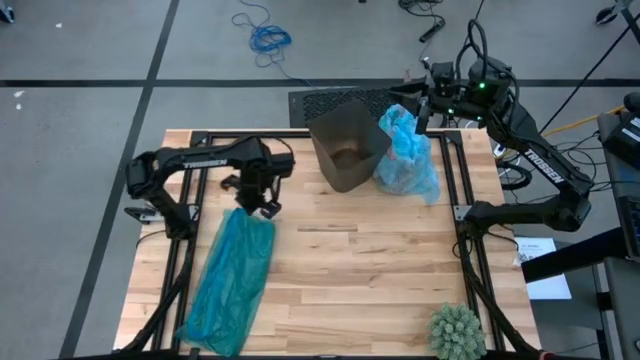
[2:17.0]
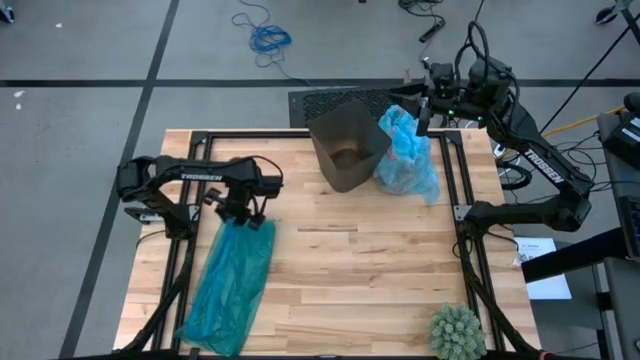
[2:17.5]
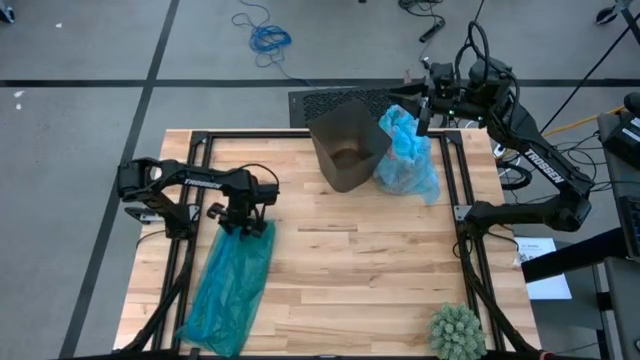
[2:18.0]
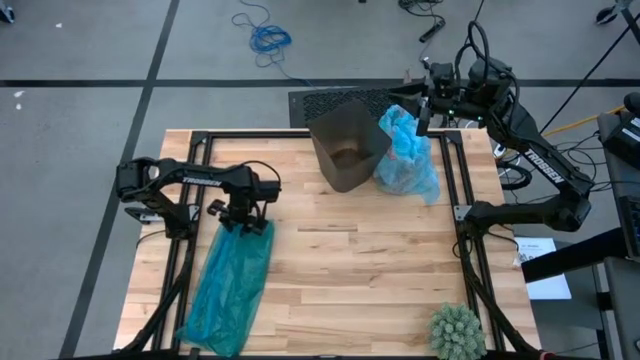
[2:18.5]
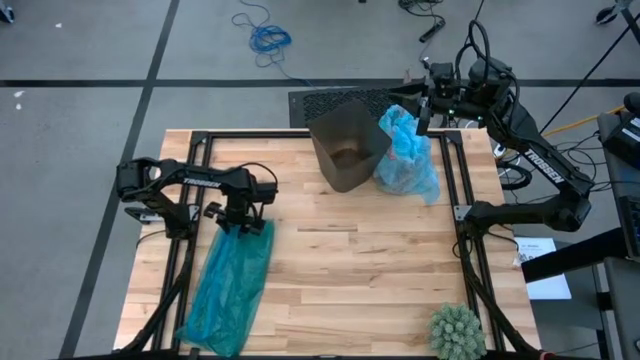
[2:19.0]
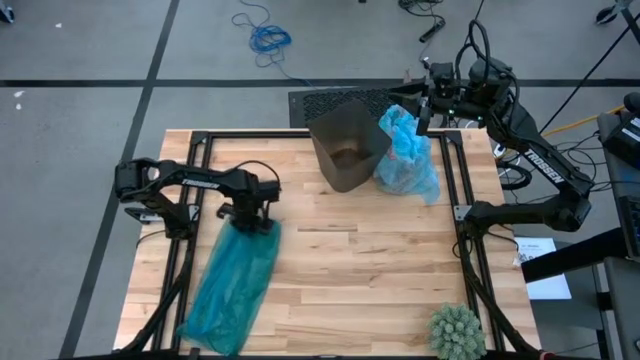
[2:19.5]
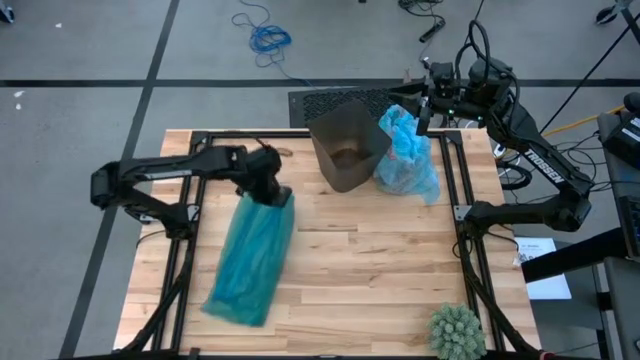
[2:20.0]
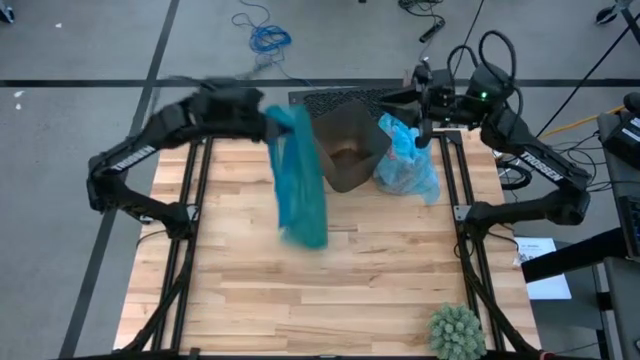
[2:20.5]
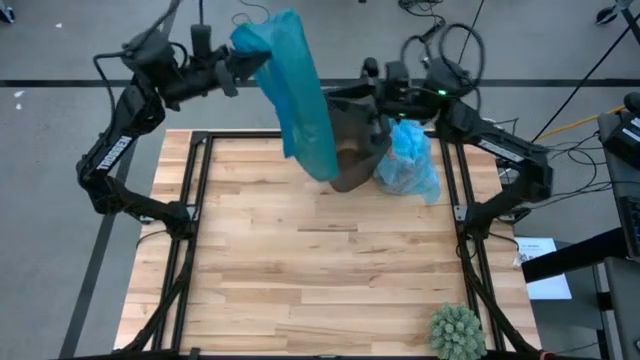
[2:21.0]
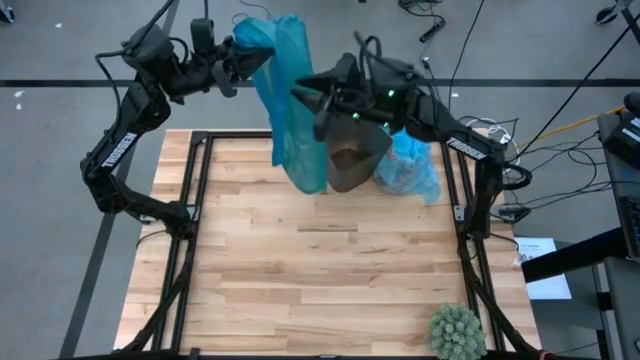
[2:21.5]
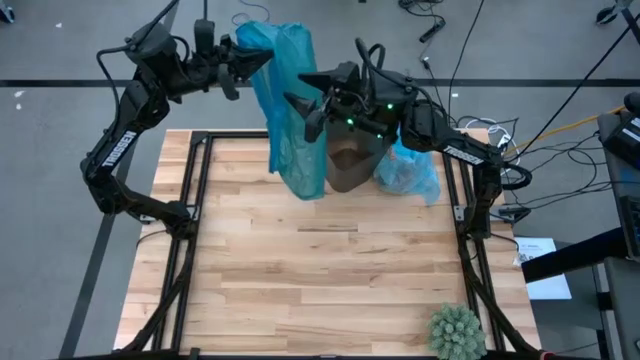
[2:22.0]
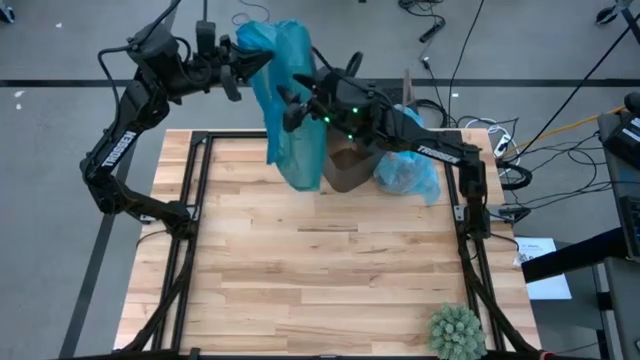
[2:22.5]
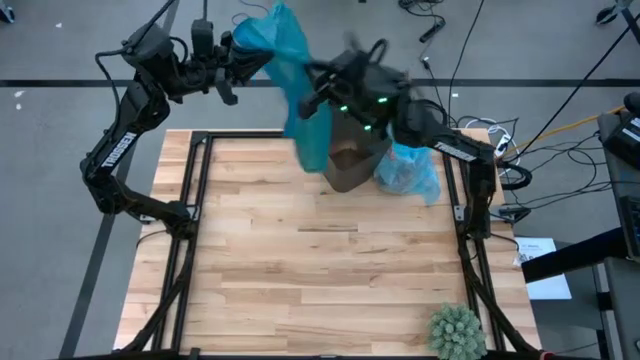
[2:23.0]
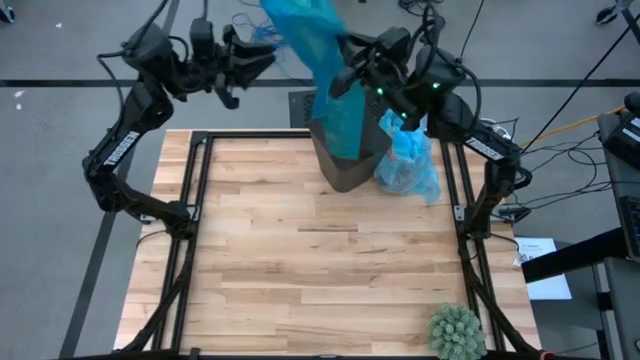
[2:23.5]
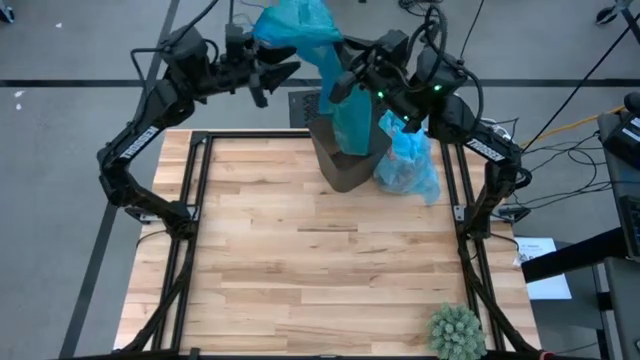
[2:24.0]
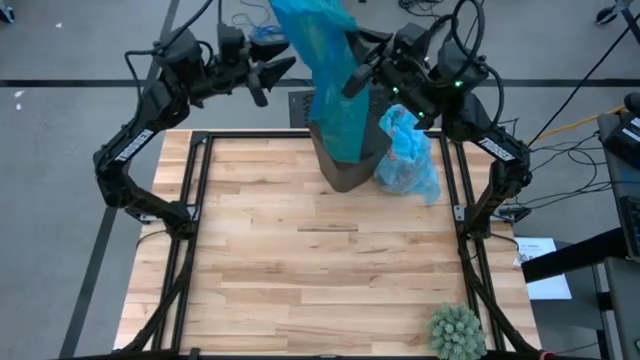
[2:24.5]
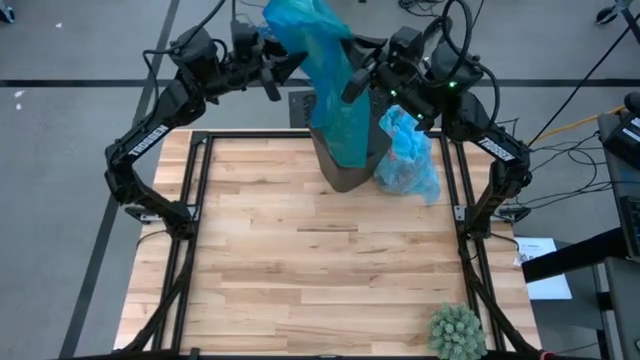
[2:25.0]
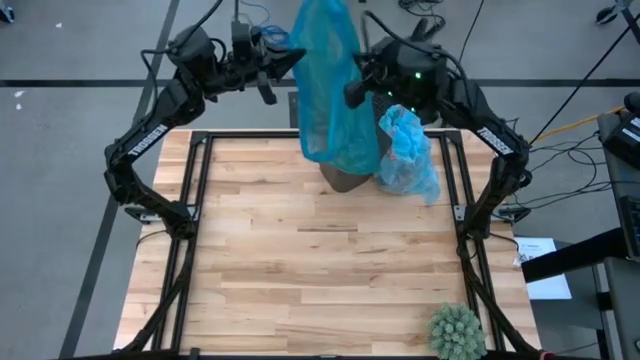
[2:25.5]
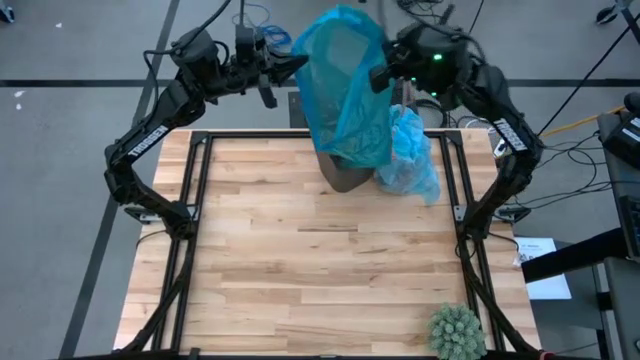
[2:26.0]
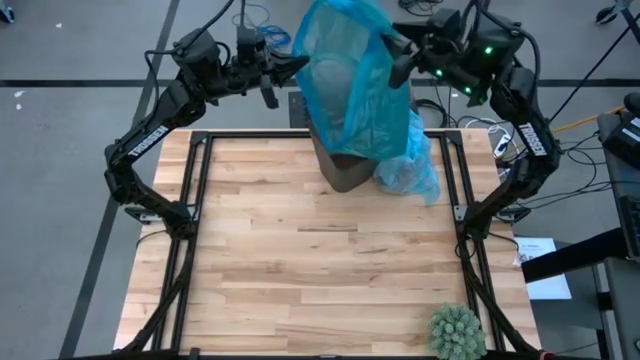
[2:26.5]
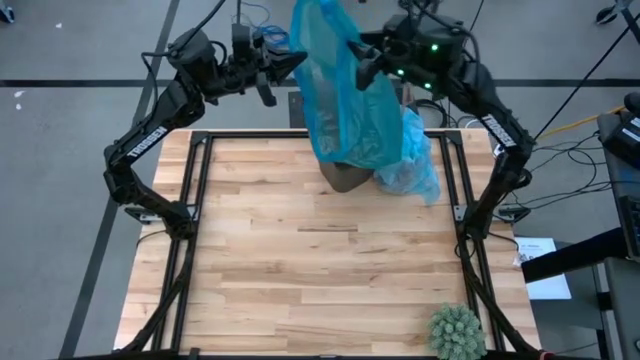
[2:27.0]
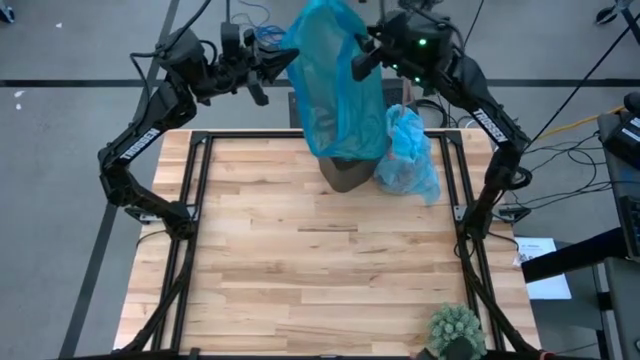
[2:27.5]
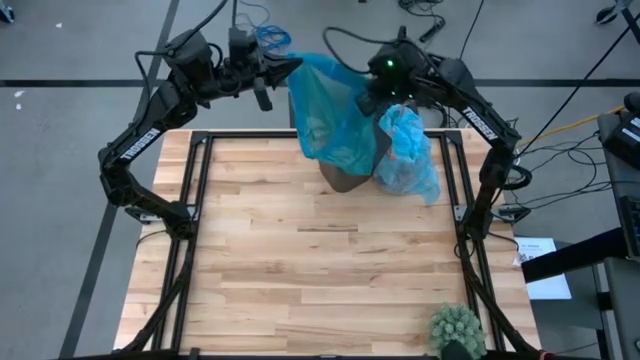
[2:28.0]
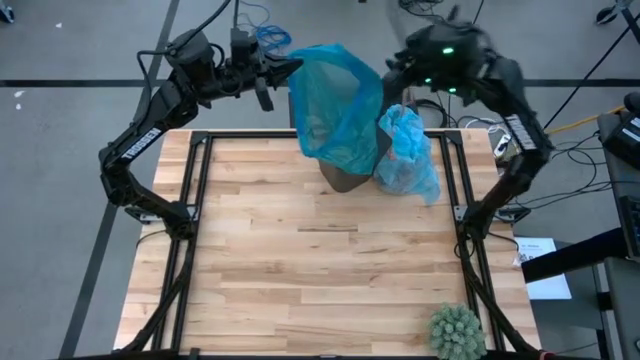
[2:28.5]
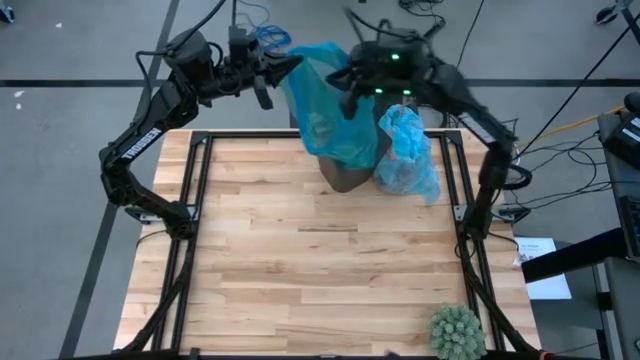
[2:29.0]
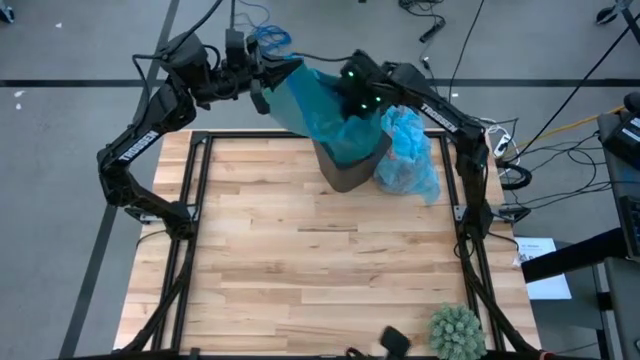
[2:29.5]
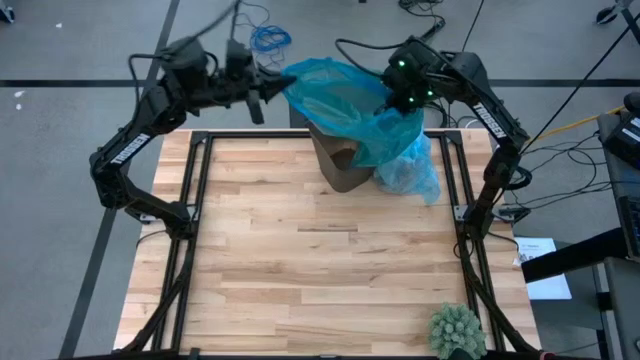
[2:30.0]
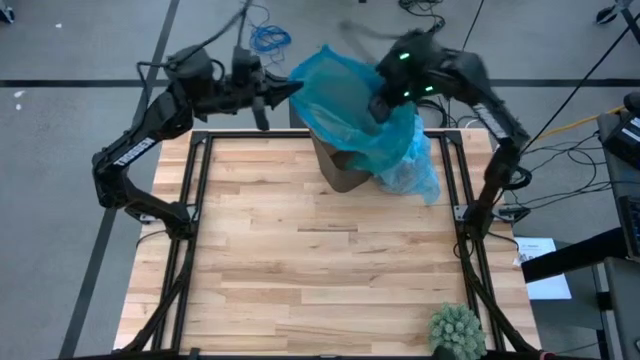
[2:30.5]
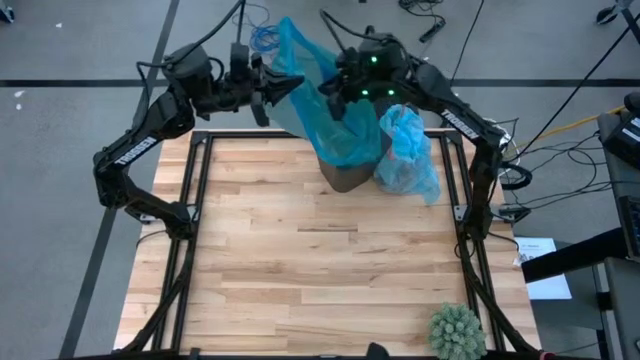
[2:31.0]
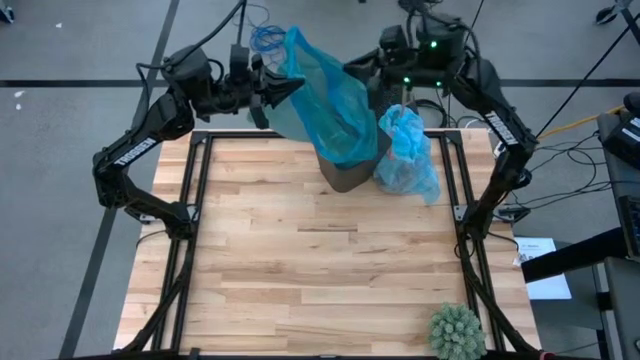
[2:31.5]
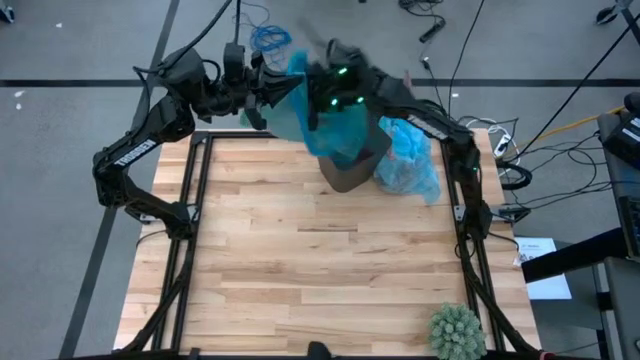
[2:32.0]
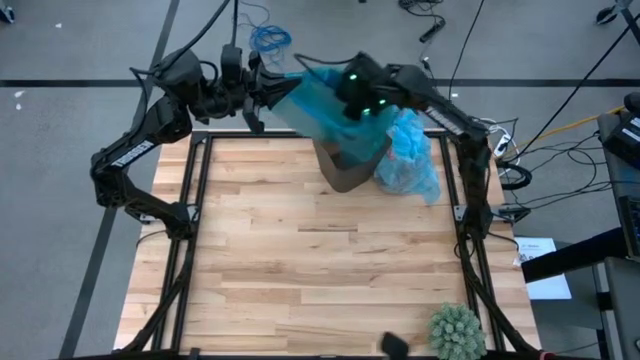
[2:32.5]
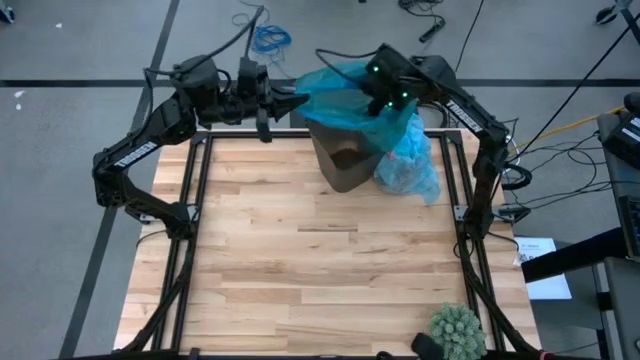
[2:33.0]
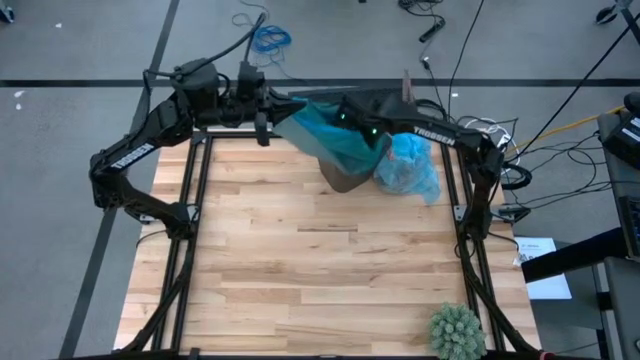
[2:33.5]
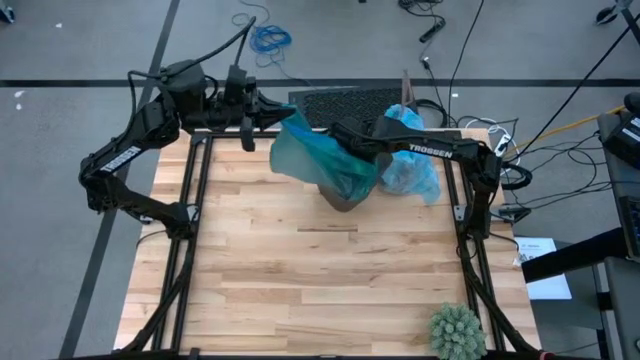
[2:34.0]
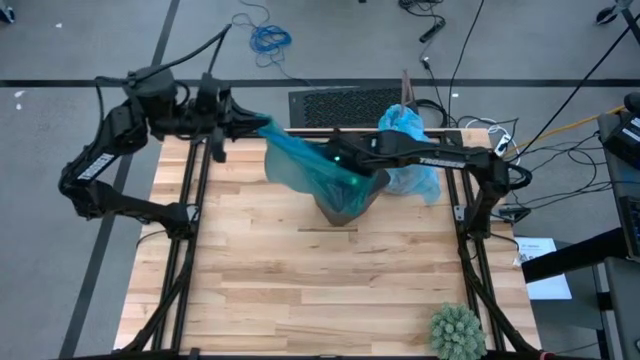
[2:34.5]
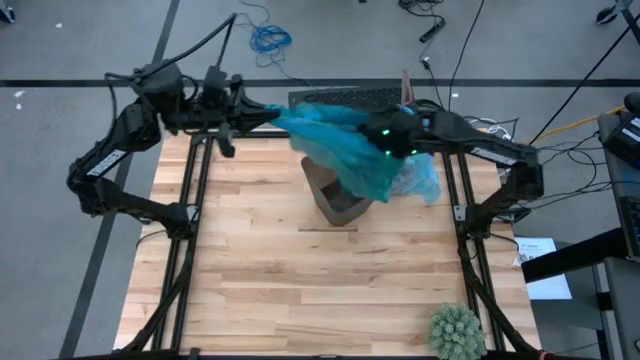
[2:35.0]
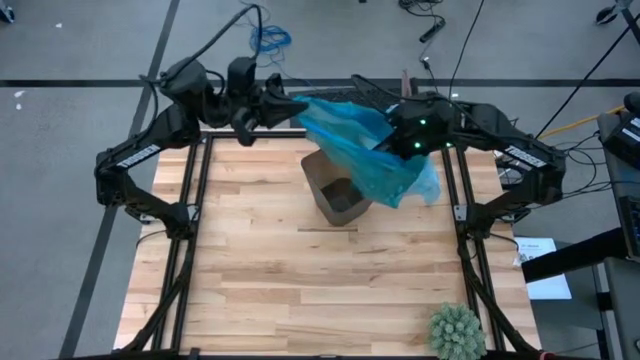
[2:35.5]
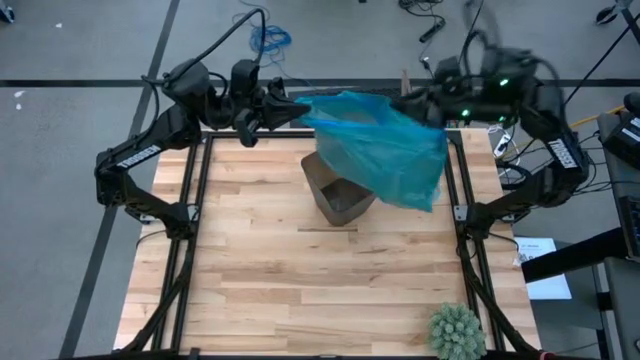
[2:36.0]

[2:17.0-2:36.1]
Task: place trash/remove bag and relplace
Insert the dark blue trash bag into the trash bin

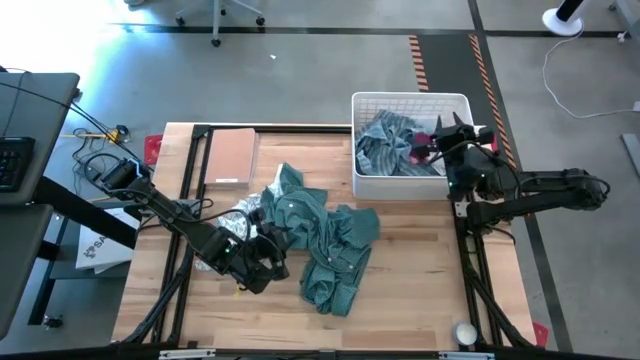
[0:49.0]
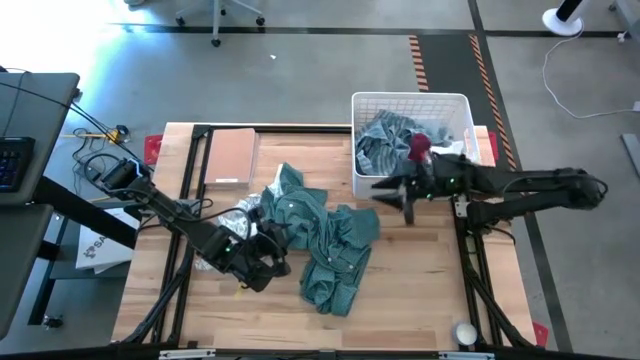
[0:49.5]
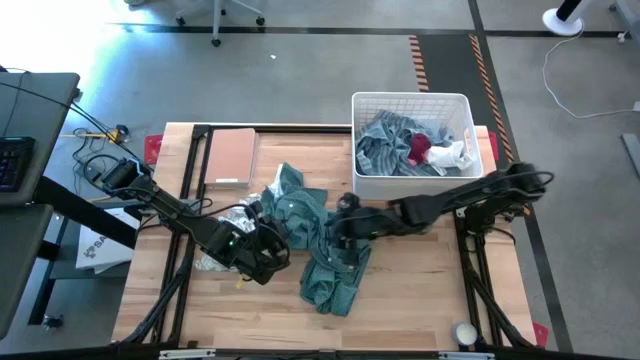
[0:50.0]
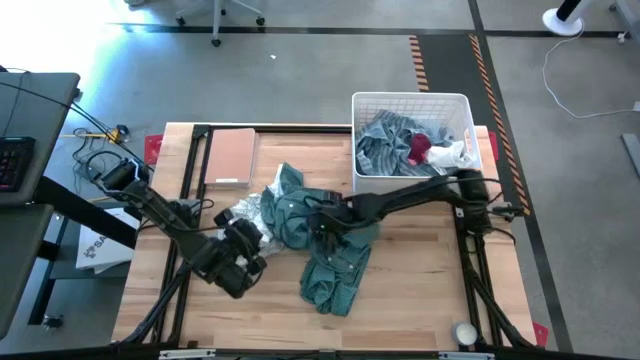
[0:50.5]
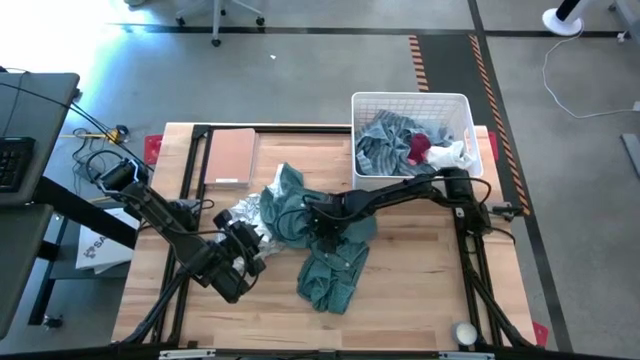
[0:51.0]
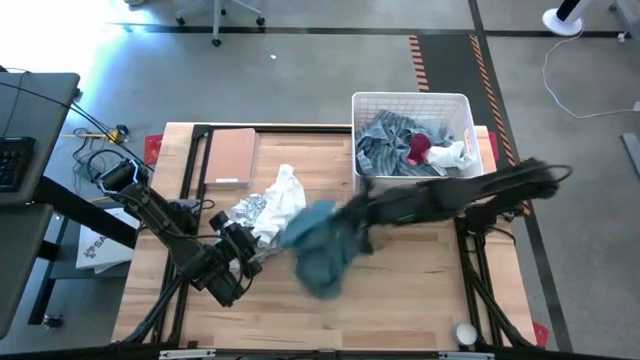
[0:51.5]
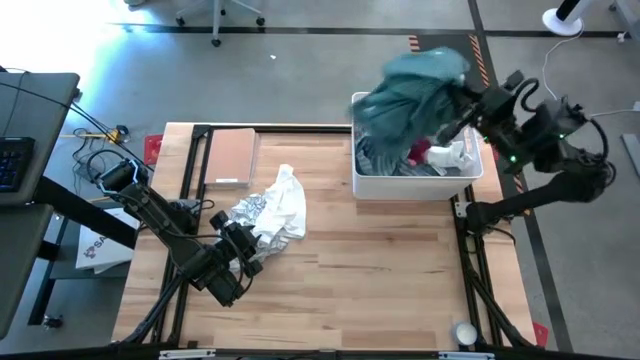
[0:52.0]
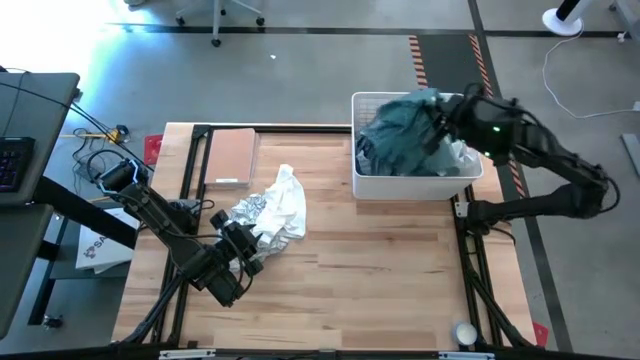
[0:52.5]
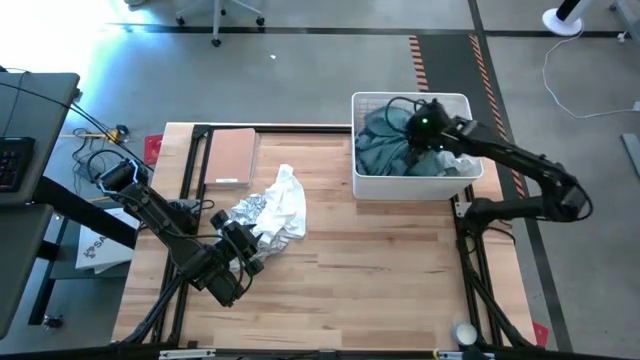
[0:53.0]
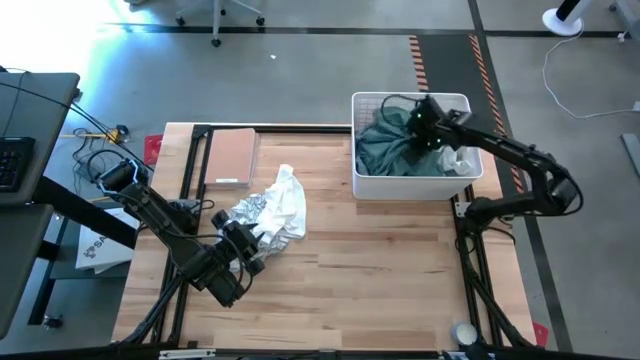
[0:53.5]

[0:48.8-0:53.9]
Task: Sort clothes
Put the green polo shirt into the white laundry bin
